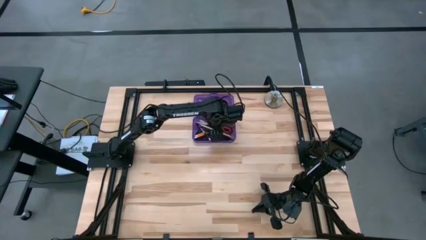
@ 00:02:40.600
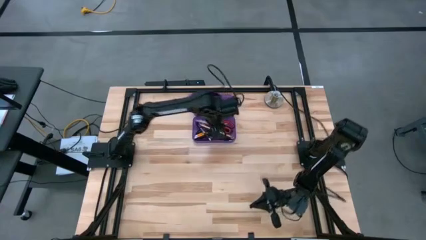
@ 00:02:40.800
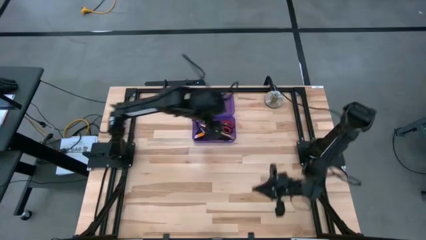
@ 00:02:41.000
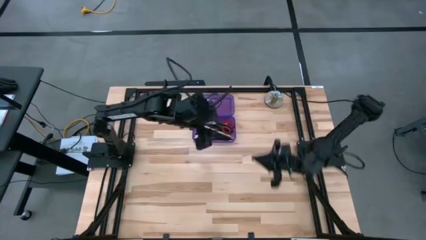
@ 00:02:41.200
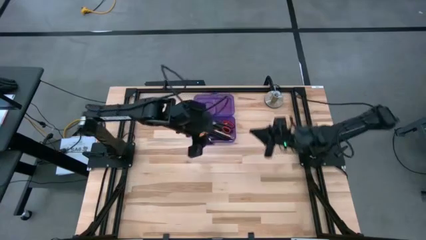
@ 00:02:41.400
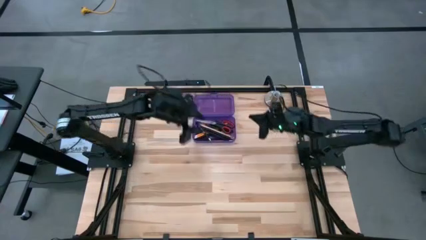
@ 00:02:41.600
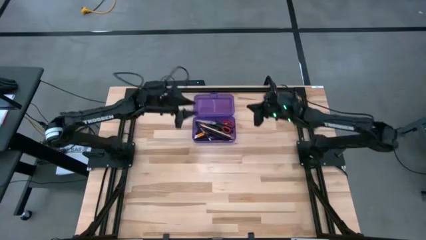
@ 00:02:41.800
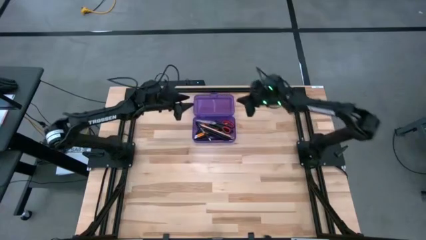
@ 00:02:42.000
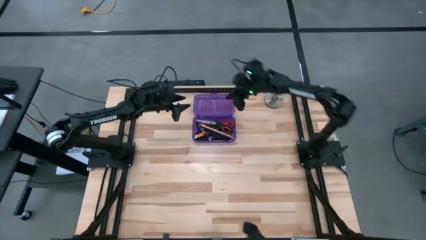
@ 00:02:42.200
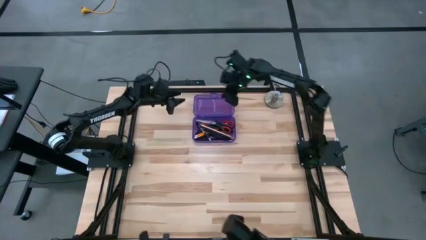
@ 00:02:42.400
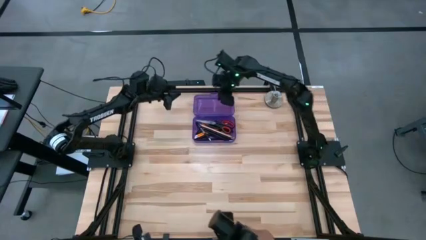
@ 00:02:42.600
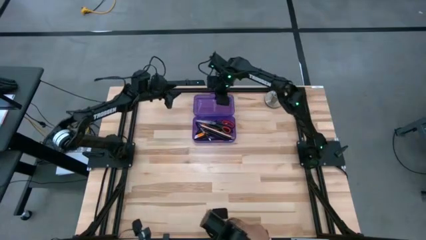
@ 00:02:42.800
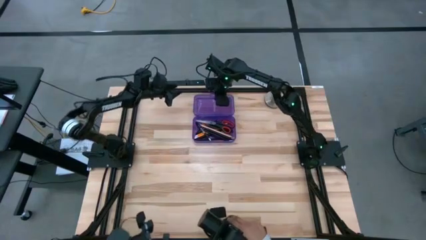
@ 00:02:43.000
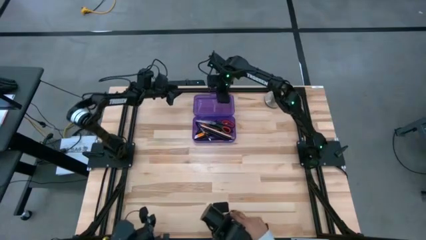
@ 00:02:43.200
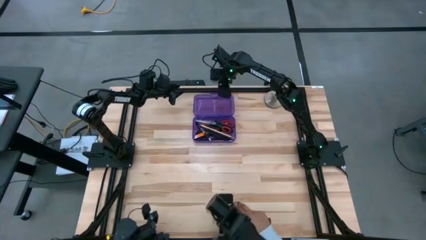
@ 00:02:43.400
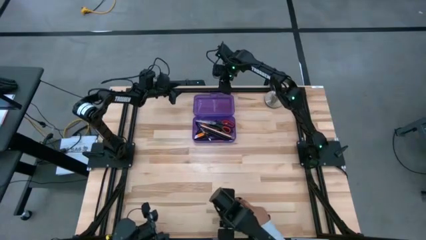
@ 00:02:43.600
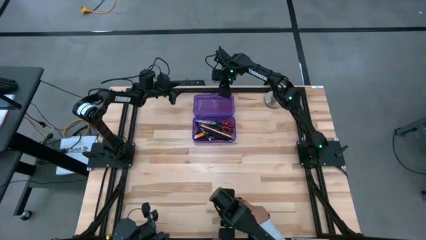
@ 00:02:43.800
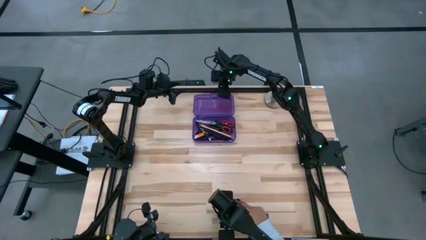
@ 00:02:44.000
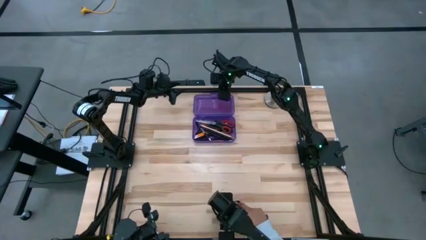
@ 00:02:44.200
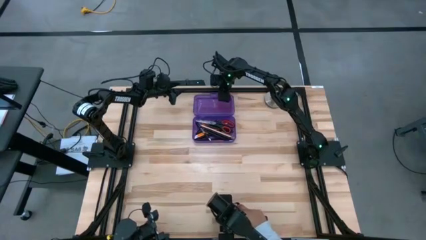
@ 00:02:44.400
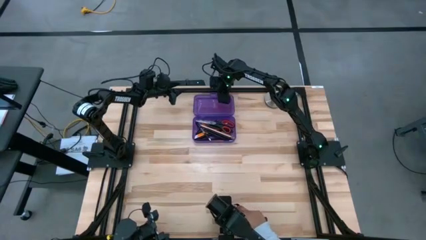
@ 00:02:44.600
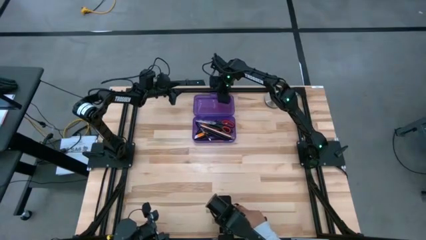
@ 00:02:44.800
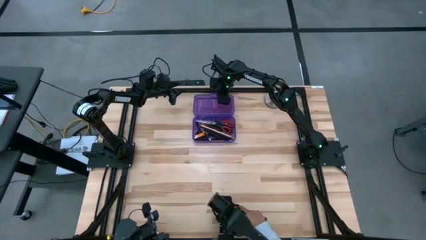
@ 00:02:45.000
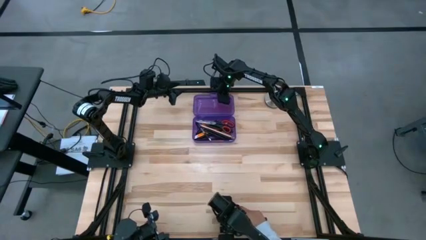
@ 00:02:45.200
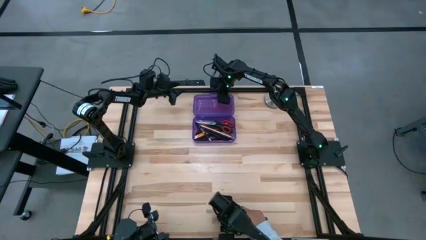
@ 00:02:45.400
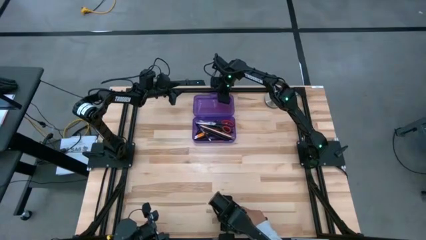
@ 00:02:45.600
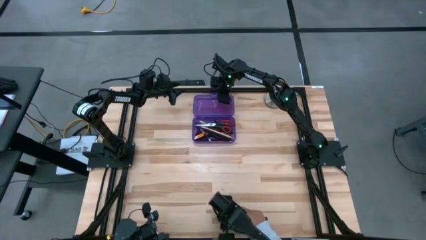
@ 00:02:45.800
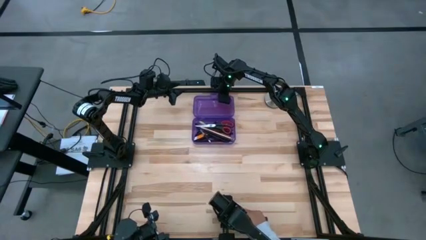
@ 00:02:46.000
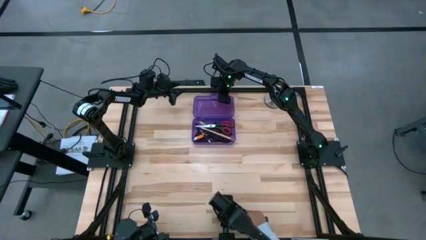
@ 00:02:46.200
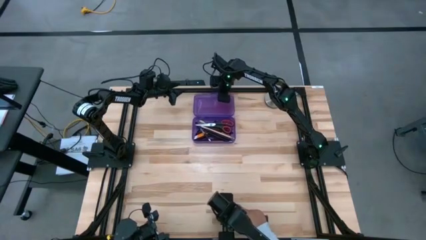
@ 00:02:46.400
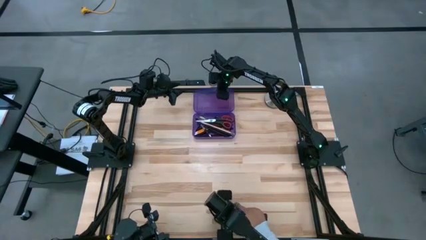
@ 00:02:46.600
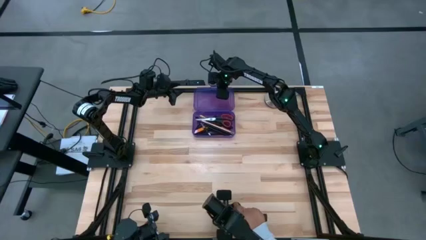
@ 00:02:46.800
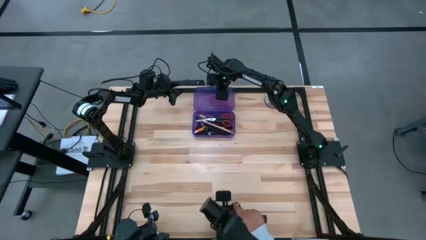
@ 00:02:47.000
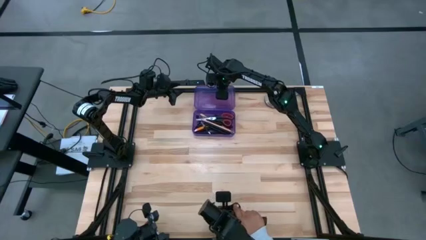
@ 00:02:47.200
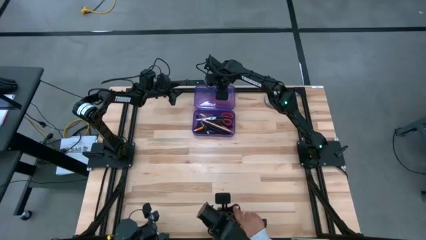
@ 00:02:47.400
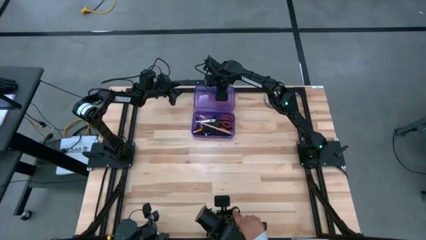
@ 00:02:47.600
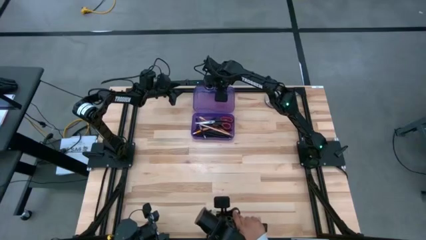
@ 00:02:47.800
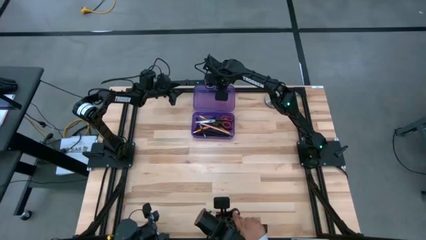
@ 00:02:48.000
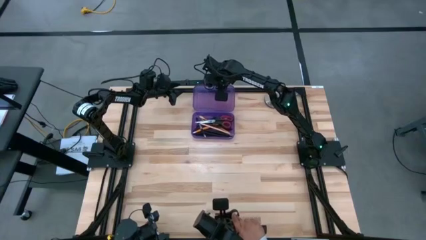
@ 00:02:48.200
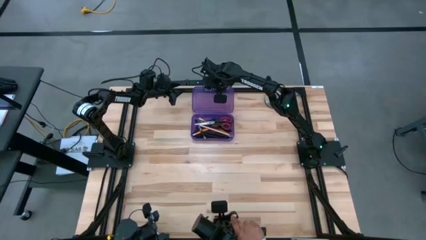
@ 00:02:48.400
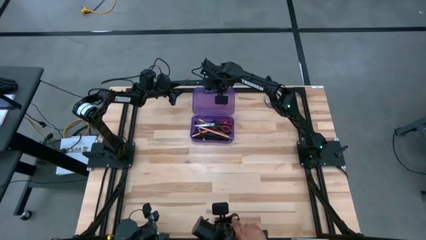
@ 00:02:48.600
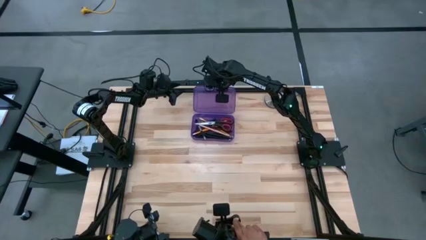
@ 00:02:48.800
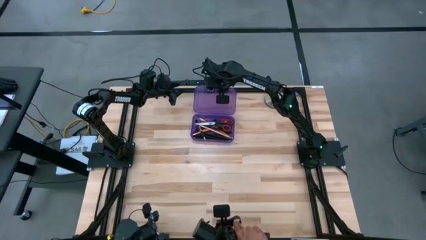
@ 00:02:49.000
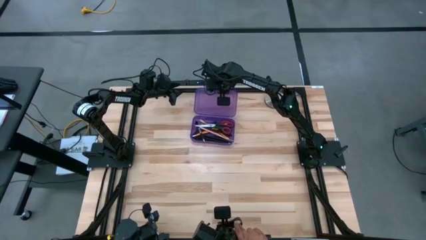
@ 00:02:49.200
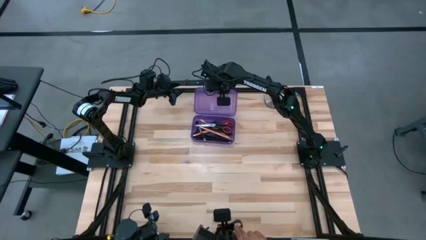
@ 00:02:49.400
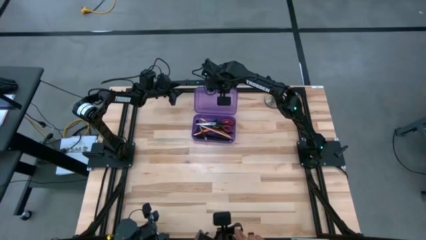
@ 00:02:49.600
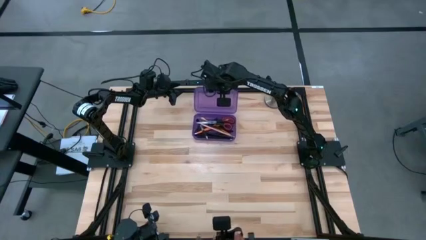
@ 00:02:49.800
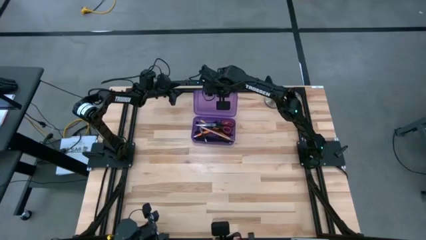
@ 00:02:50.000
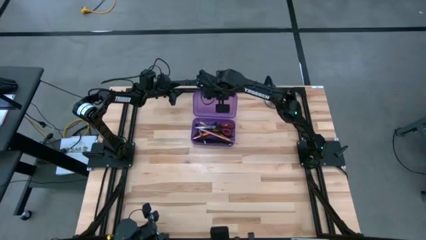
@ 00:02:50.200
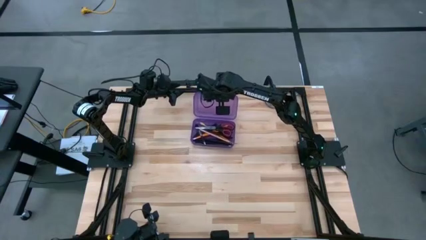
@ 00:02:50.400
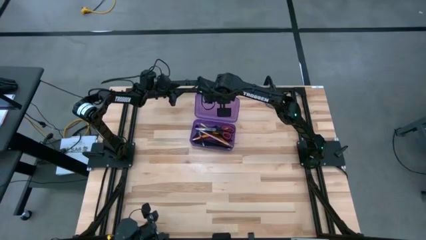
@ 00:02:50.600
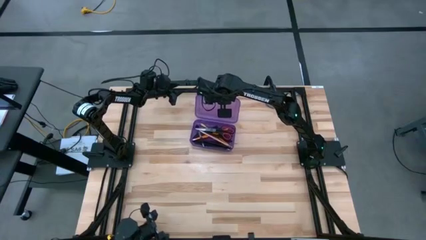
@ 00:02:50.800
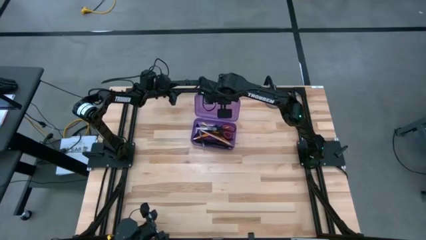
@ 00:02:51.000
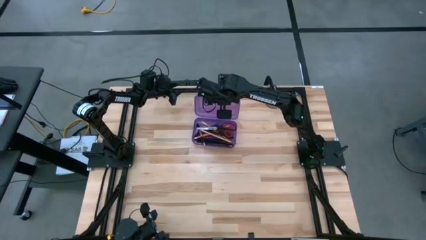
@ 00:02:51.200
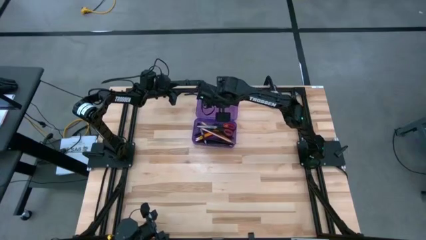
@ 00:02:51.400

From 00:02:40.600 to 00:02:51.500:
Task: Pick & place school supplies into a supply box
Close the purple supply box

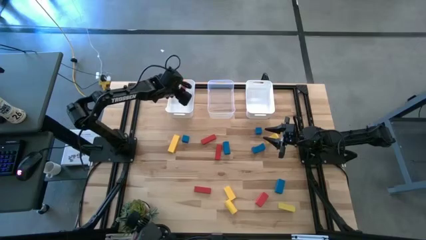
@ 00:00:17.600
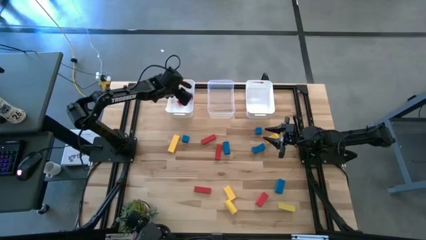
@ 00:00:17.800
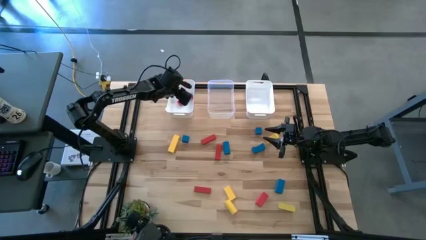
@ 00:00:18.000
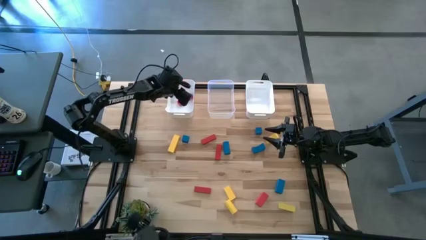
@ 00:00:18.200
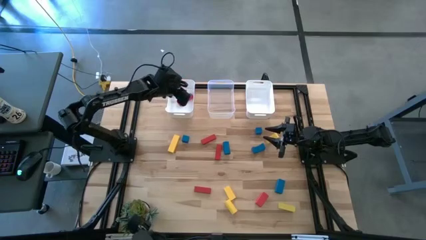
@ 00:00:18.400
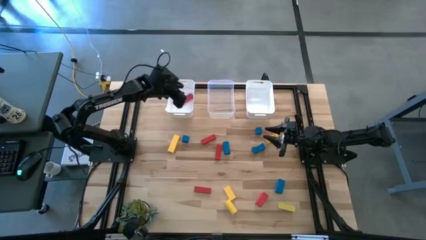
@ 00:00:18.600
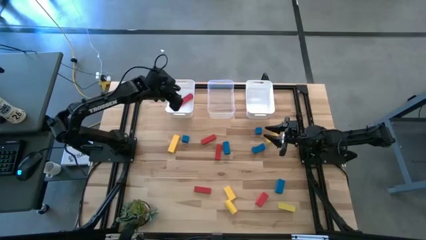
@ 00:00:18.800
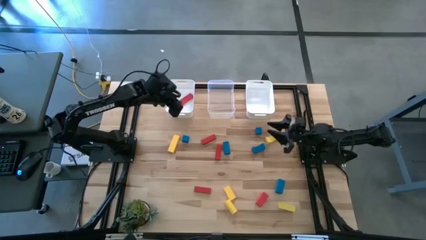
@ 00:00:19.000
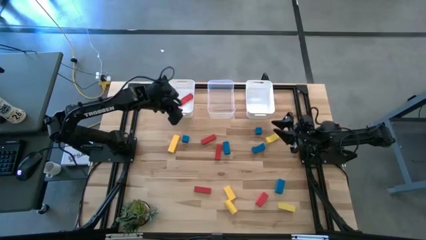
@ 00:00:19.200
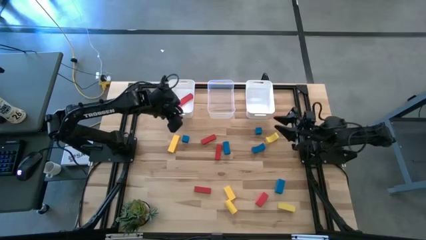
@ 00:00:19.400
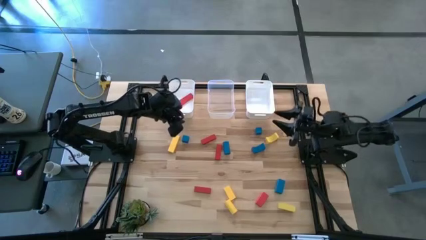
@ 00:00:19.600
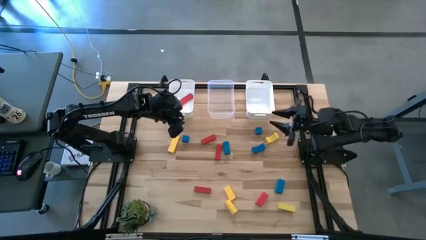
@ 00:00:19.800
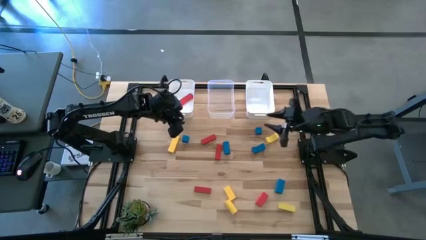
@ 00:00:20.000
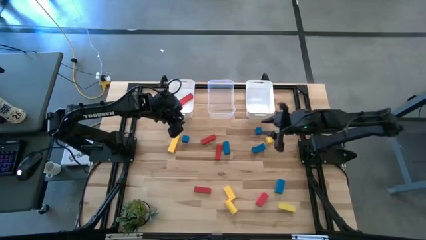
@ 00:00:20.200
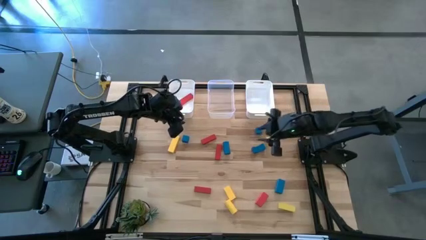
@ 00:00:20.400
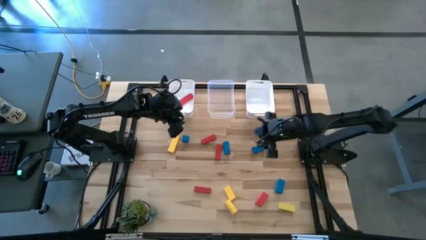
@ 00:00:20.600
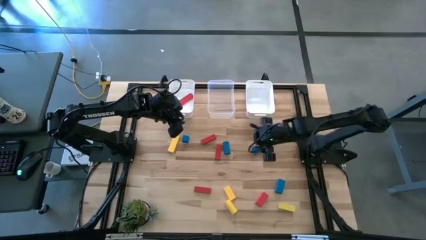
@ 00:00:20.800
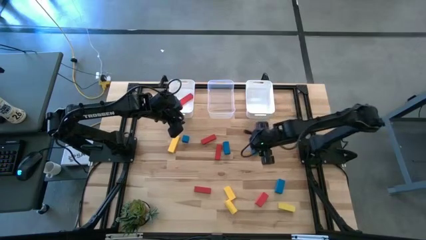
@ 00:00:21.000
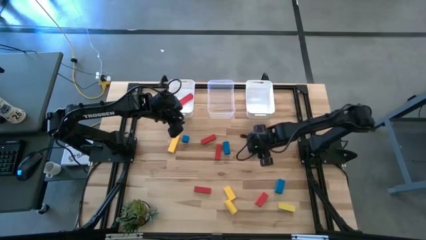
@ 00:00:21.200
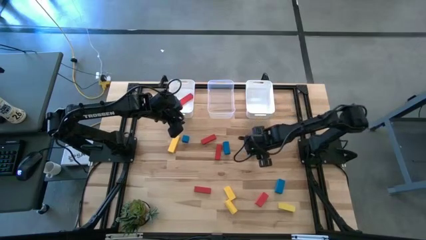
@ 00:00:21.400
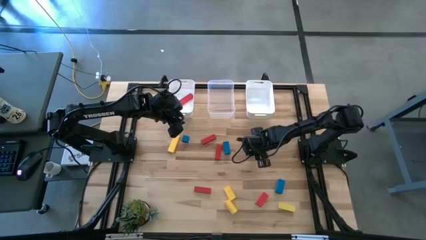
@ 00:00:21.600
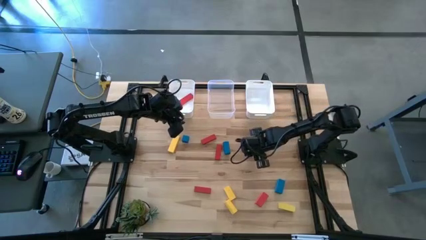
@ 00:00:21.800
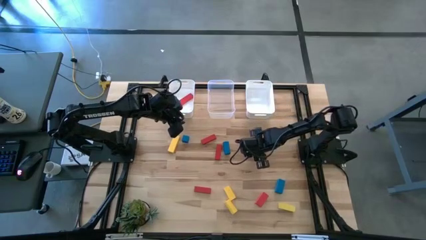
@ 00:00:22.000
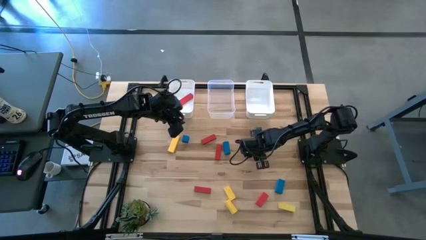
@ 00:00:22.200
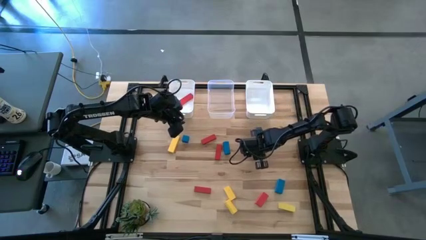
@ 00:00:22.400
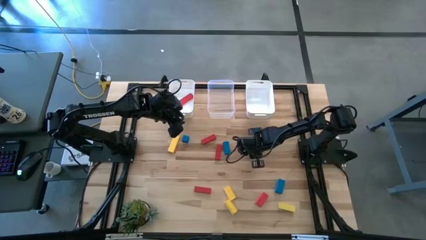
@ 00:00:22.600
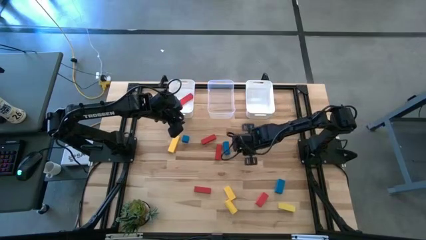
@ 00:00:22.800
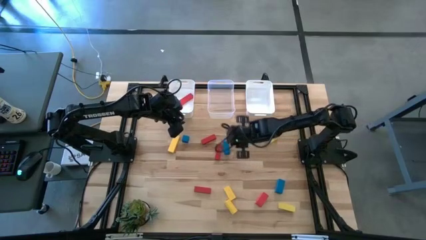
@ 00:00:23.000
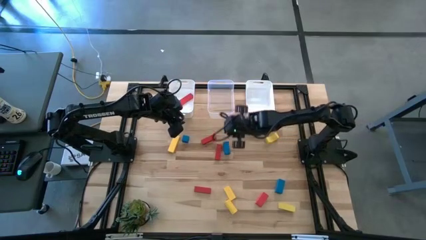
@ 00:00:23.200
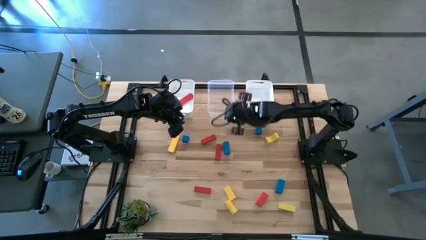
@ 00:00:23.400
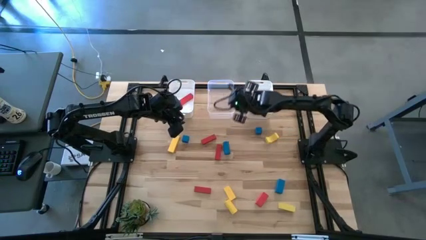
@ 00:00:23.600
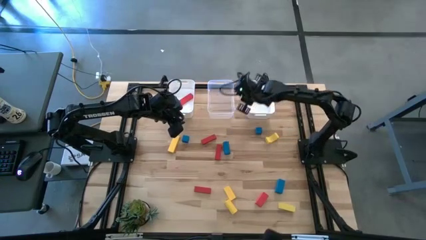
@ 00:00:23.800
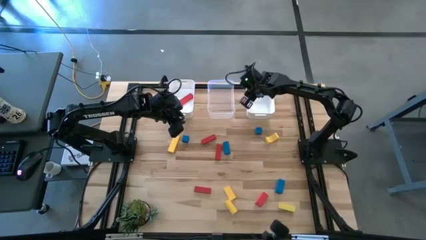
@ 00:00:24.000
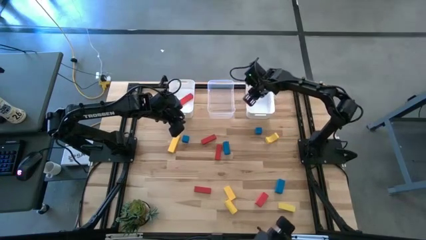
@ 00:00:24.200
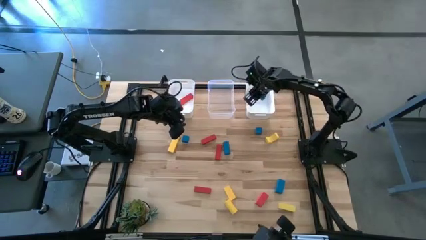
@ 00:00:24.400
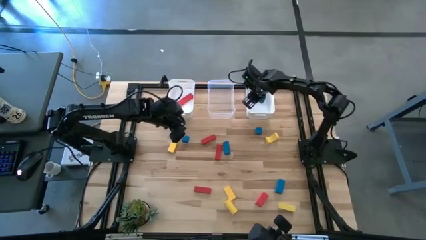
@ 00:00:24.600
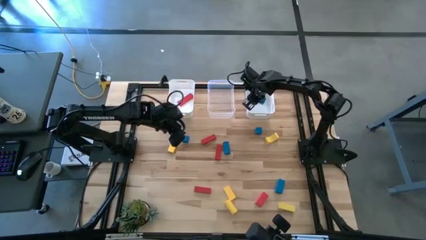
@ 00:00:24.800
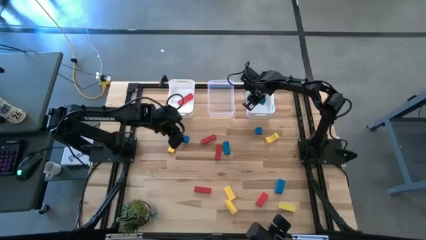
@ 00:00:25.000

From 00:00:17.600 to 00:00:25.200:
Task: Sort & place blocks by color
Put the blue block into the right white bin
